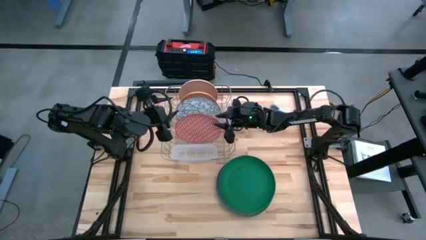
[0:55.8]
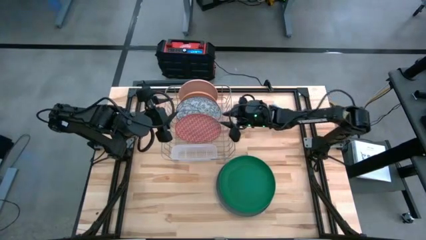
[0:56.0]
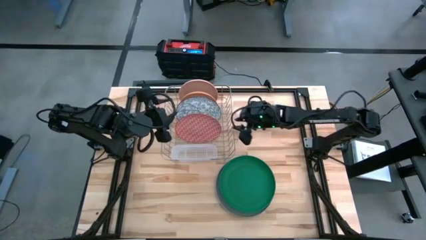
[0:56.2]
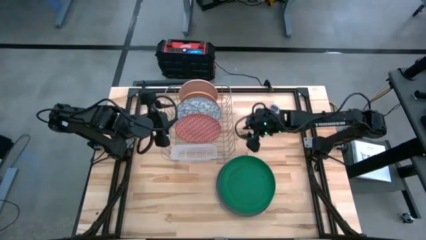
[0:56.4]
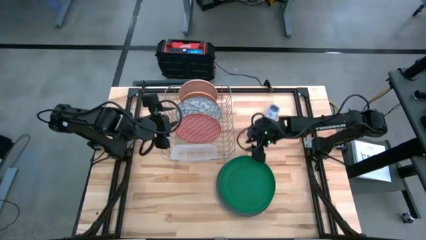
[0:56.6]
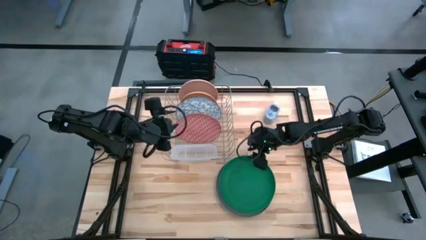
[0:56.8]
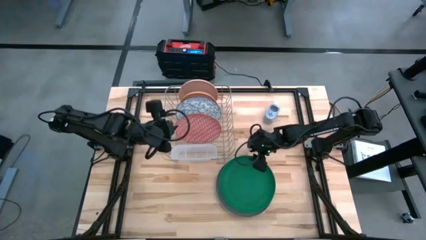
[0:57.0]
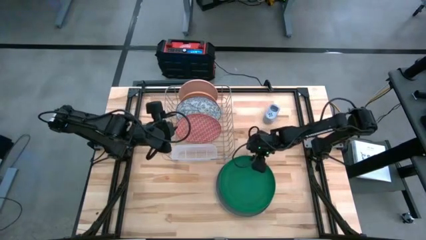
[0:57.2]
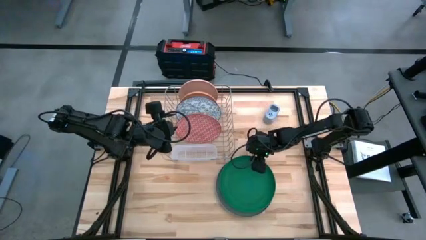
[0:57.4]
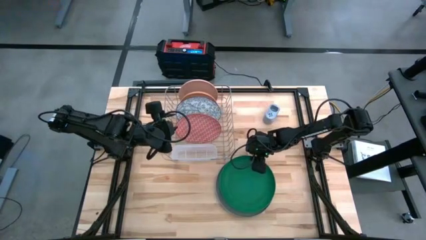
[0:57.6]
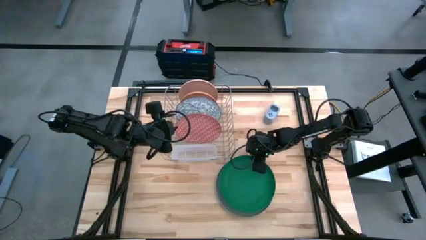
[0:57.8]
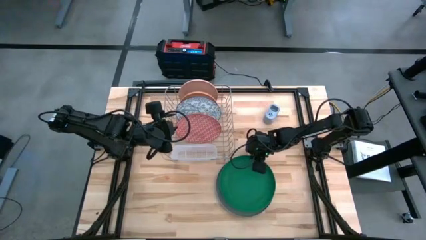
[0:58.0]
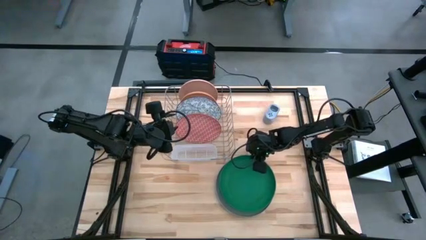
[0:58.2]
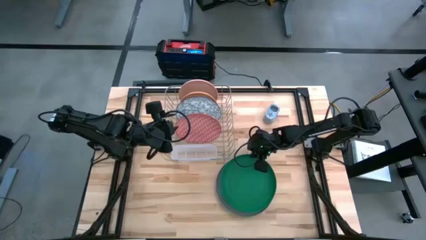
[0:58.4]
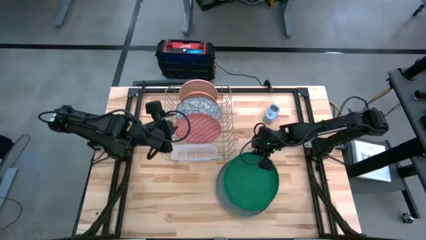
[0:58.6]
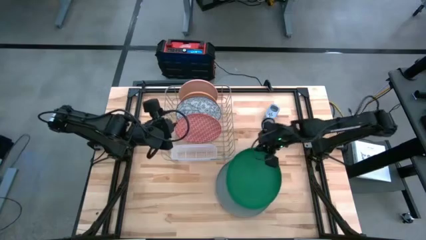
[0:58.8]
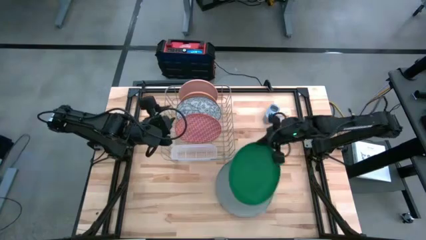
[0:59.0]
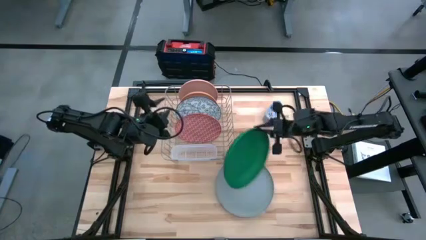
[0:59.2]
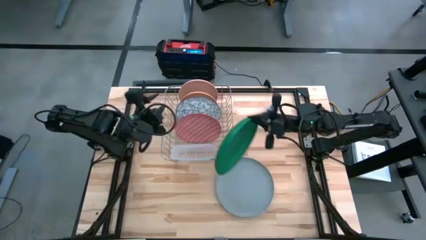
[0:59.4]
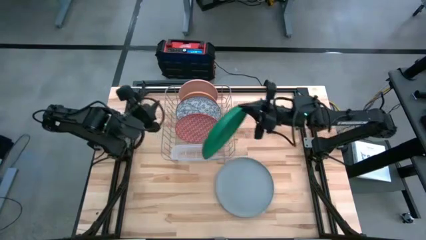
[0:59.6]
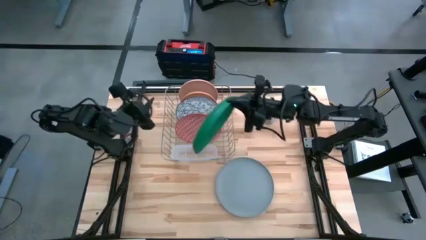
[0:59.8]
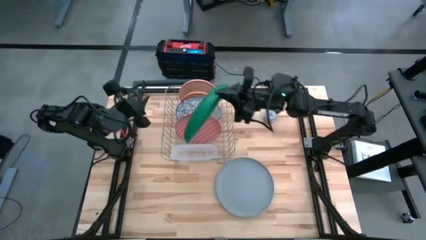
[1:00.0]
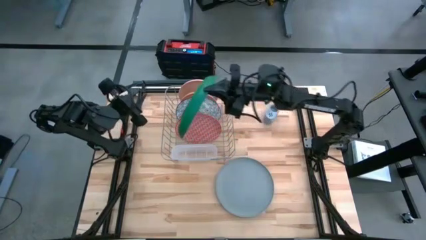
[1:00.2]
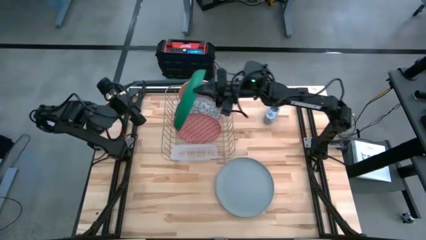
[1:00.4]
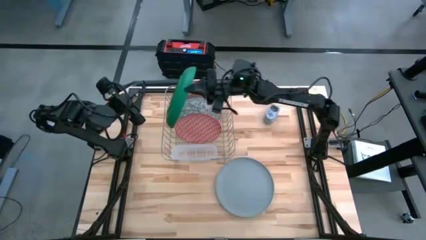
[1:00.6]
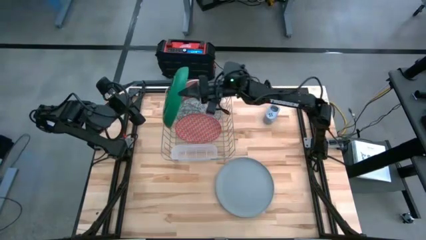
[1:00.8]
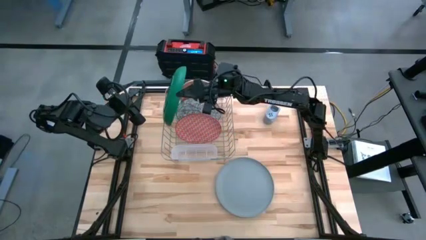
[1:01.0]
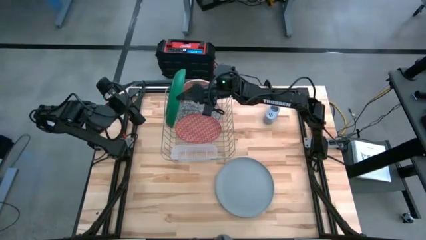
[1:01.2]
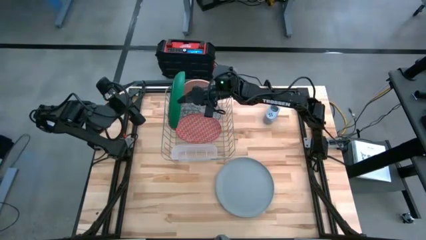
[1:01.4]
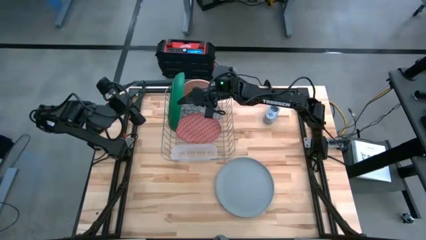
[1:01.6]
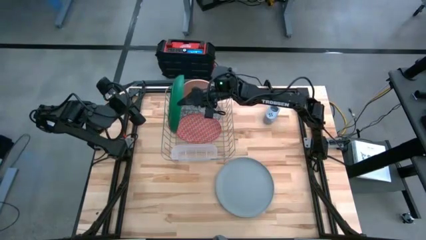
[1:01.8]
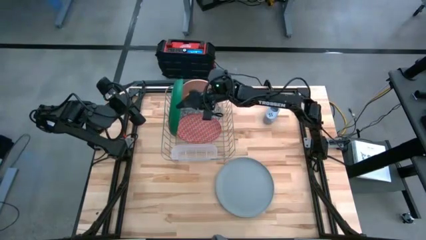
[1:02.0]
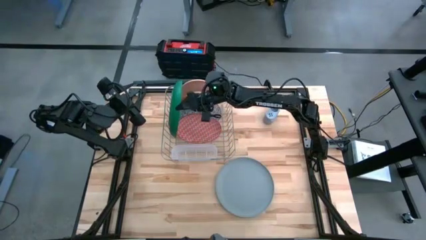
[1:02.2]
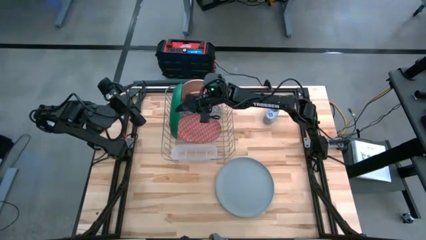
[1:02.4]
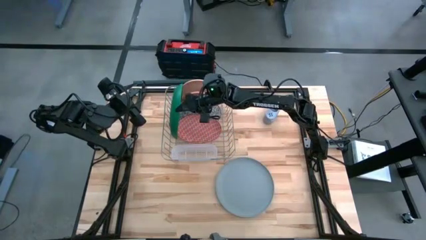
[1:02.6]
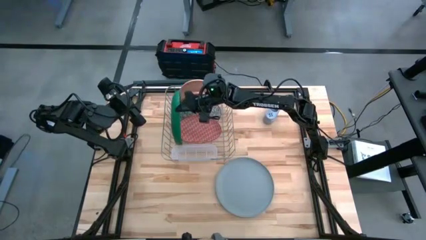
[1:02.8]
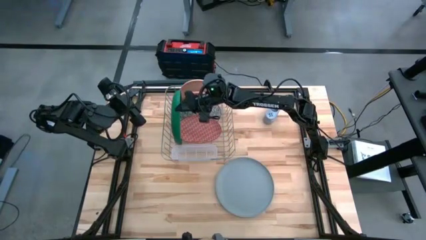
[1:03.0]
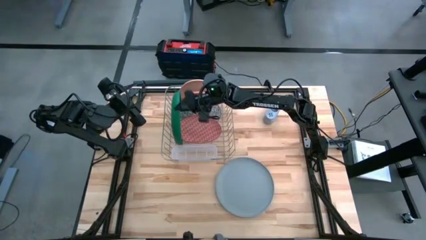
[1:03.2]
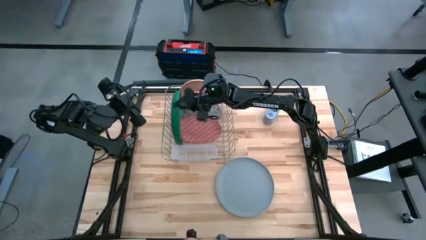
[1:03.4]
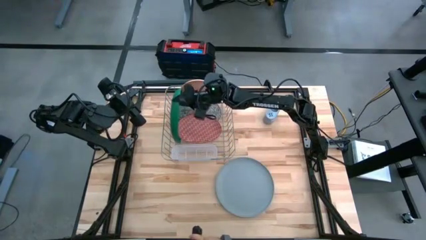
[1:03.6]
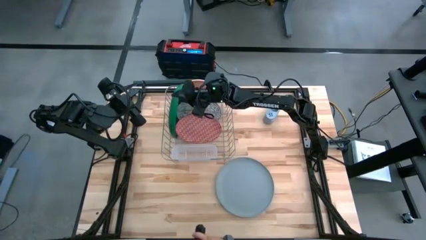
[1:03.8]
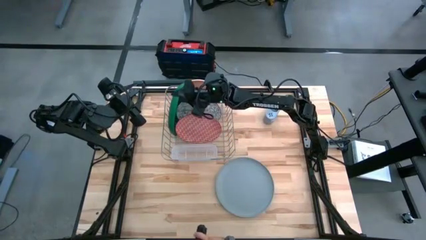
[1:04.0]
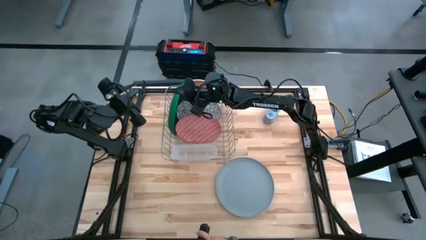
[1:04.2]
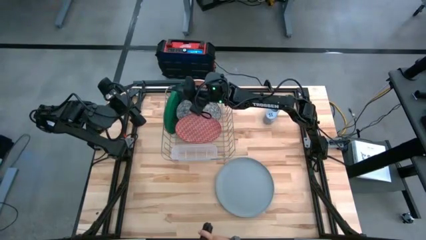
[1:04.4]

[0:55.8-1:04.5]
Task: Sort dishes
Put the green plate in the dish rack

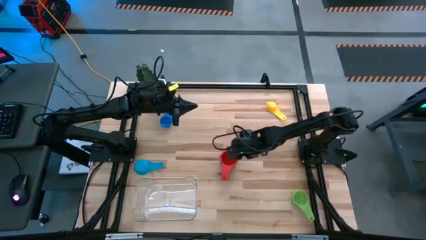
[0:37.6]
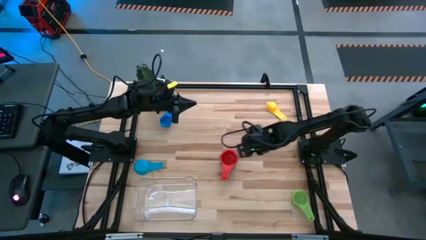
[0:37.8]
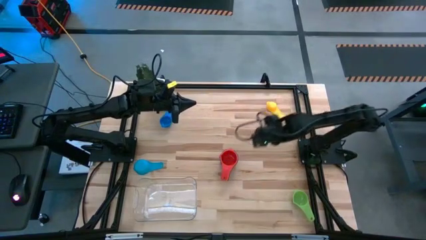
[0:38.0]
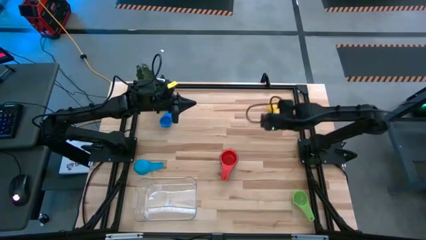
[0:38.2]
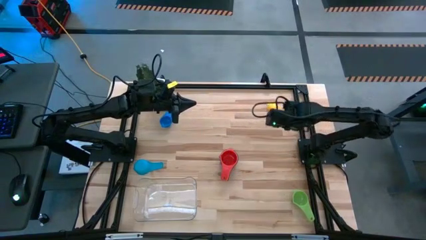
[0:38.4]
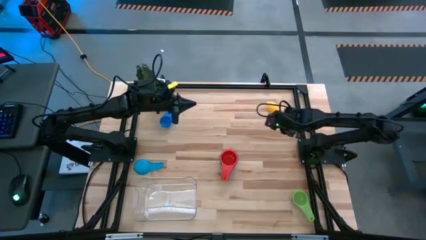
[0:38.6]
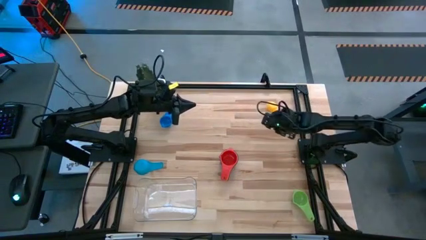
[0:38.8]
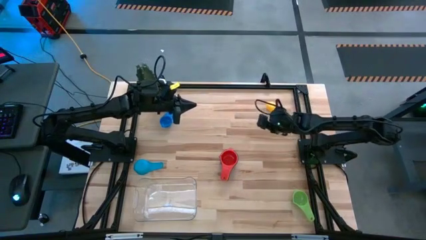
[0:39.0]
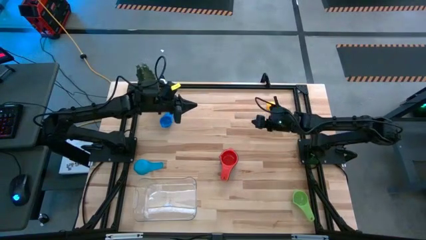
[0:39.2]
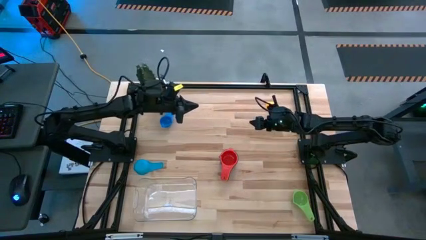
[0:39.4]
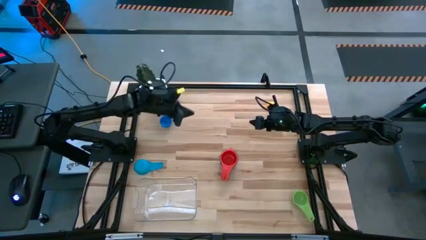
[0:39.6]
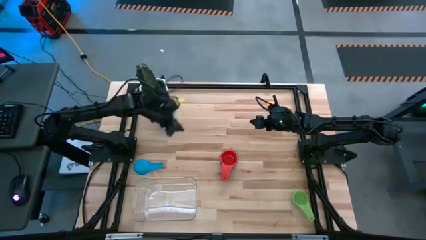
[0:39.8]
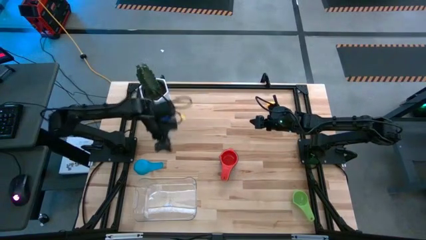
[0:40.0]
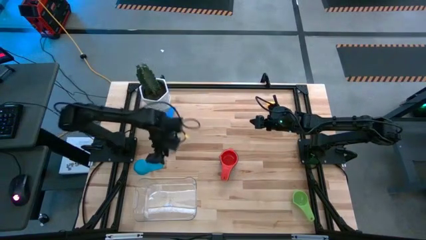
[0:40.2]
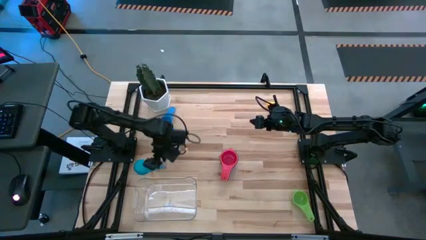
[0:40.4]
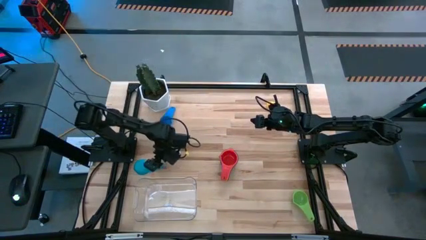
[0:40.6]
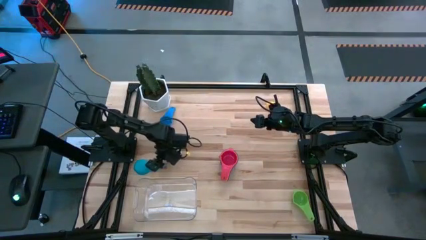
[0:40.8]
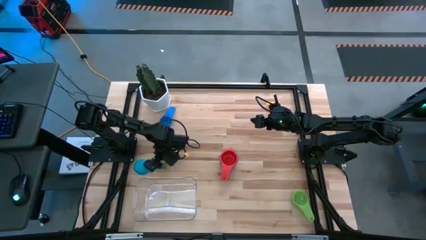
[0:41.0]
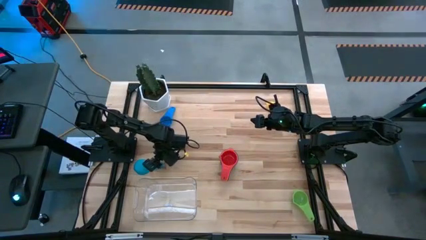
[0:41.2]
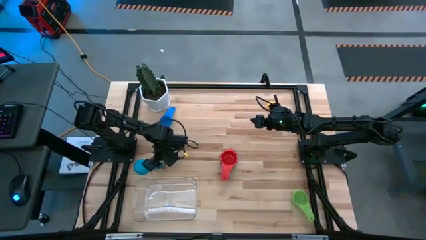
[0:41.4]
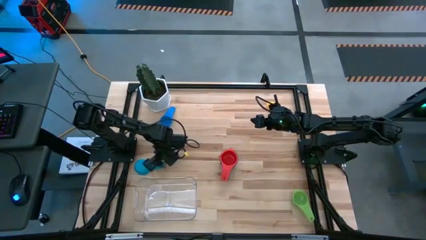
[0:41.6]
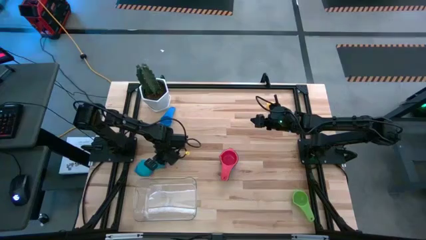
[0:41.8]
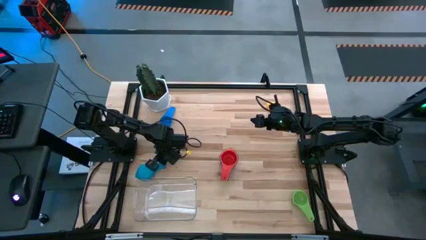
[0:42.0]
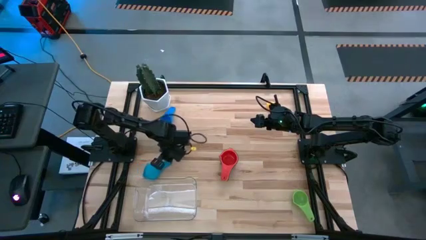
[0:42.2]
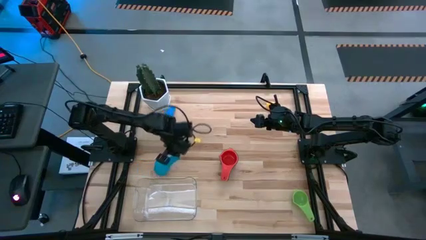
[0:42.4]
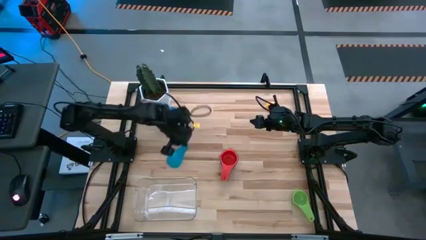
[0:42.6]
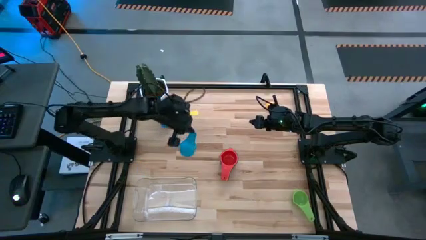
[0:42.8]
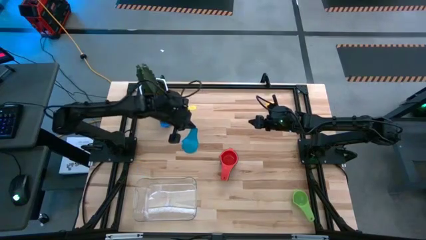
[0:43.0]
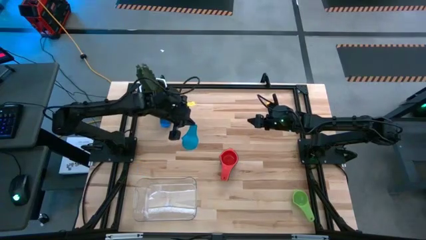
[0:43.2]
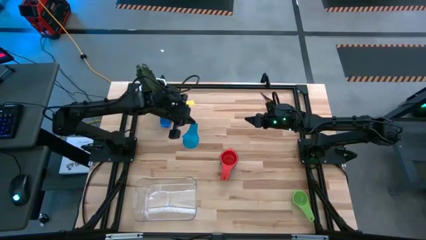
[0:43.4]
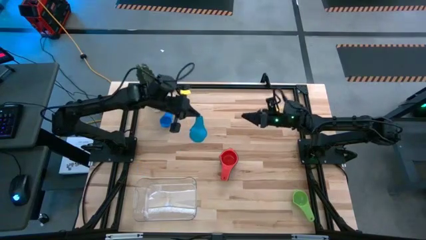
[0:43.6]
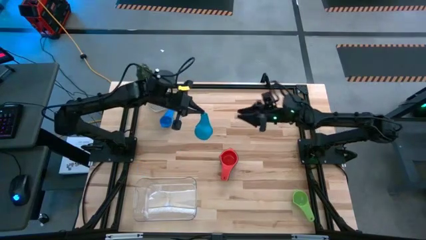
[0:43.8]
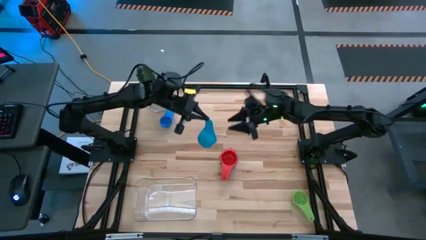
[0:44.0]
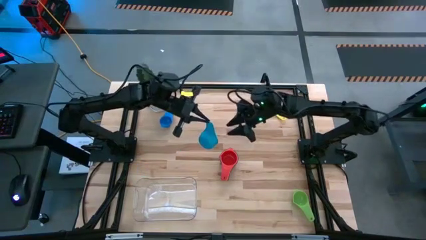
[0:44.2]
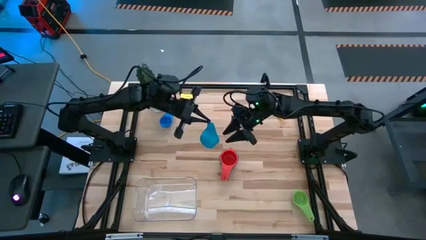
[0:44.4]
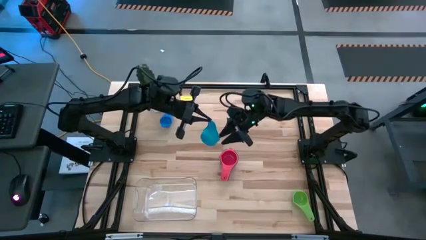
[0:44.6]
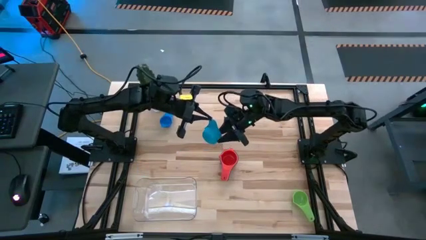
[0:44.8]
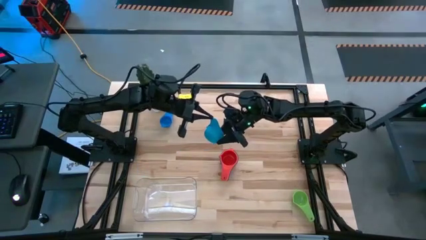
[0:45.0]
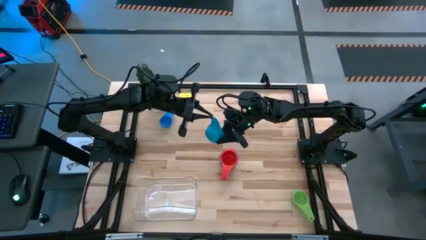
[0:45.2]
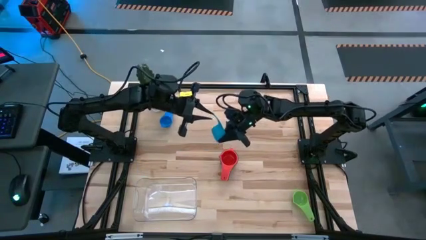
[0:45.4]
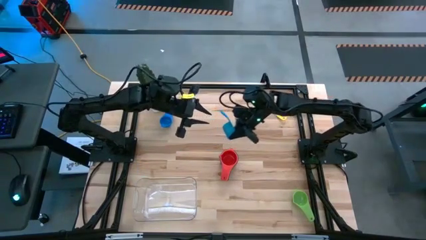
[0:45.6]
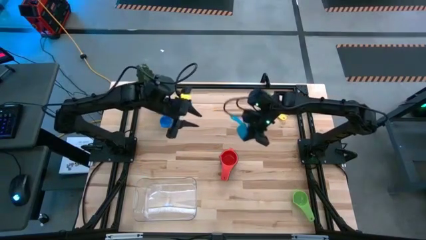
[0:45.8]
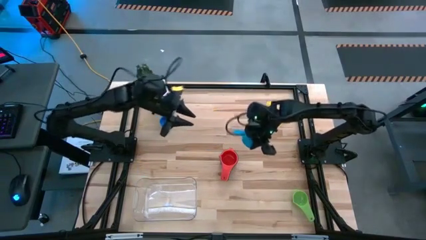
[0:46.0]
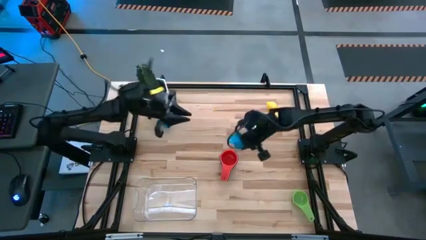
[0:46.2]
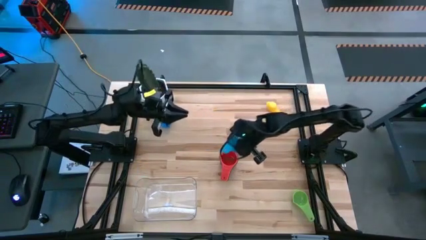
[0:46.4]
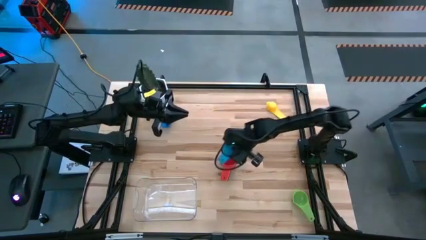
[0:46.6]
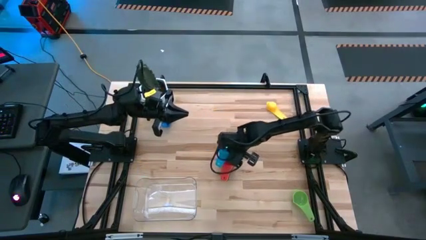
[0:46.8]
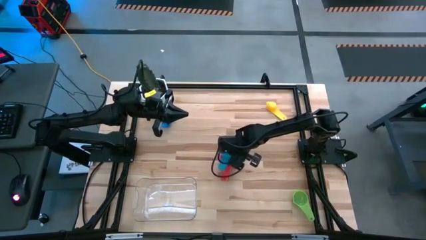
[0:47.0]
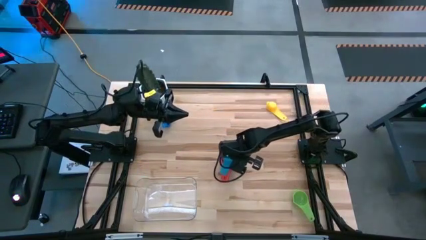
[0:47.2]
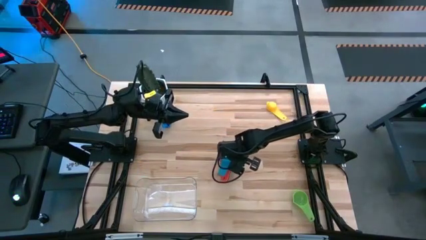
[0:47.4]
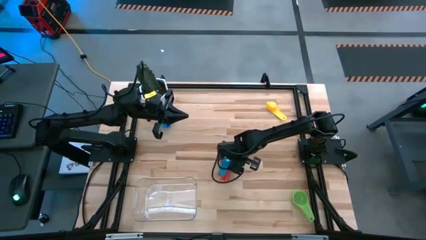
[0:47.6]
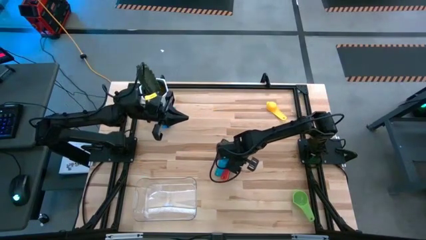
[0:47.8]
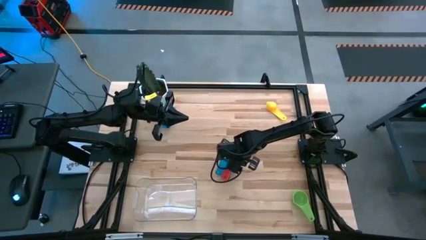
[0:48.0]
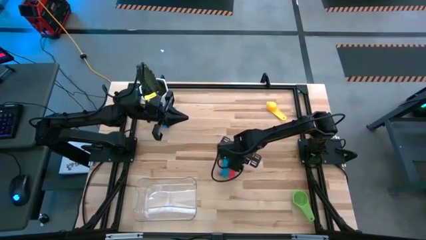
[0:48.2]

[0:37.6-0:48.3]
Task: Nest measuring cups in basket
Stack the light blue measuring cup on top of the red measuring cup
